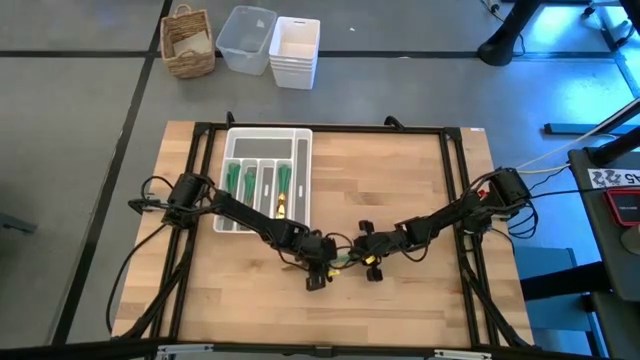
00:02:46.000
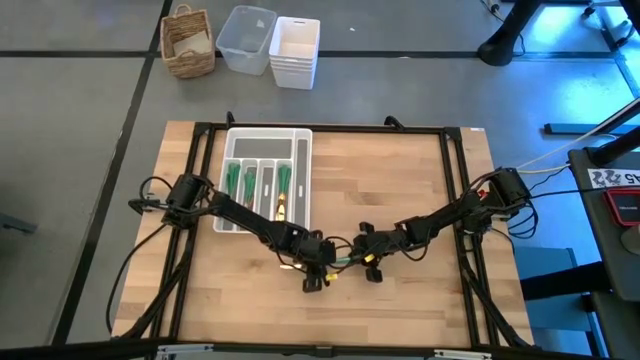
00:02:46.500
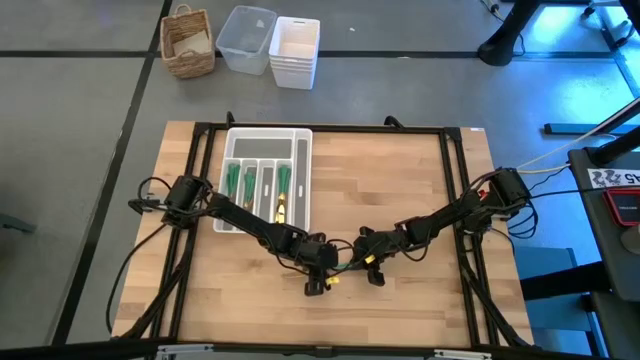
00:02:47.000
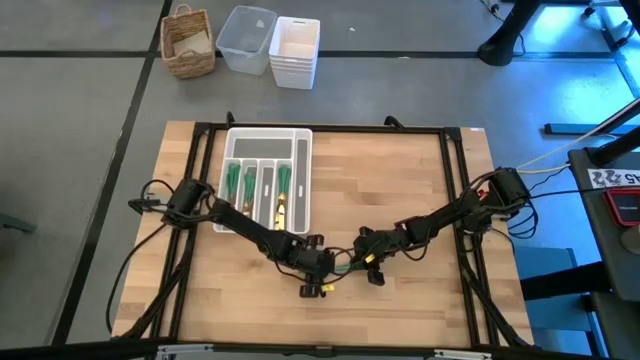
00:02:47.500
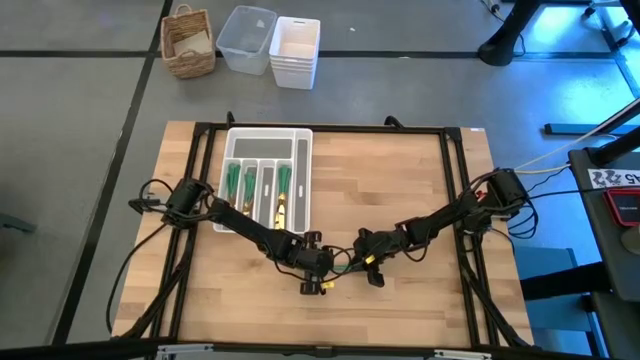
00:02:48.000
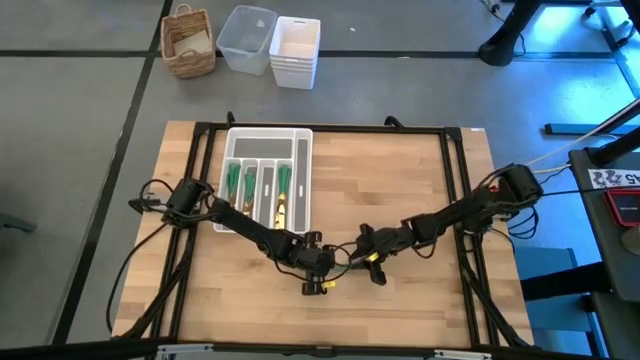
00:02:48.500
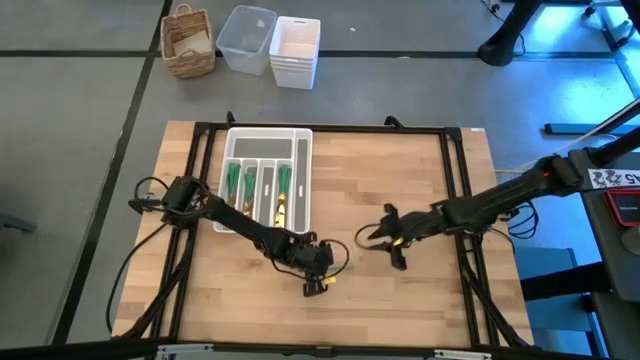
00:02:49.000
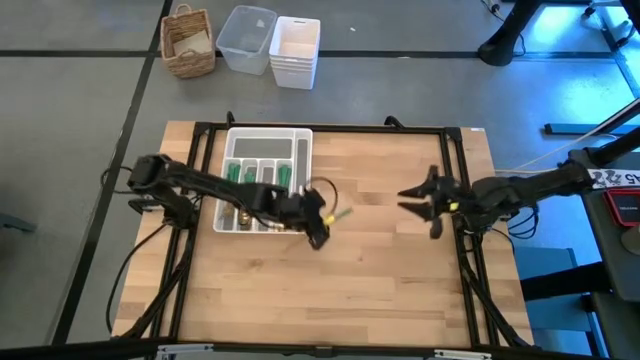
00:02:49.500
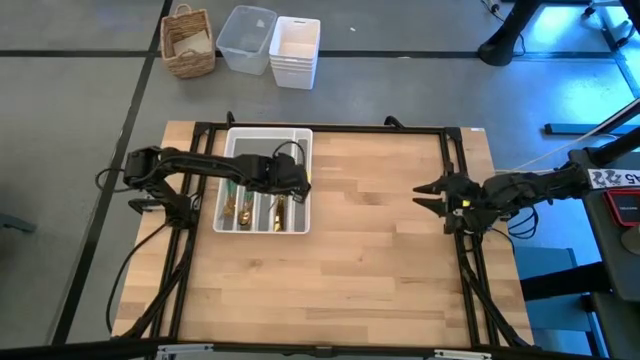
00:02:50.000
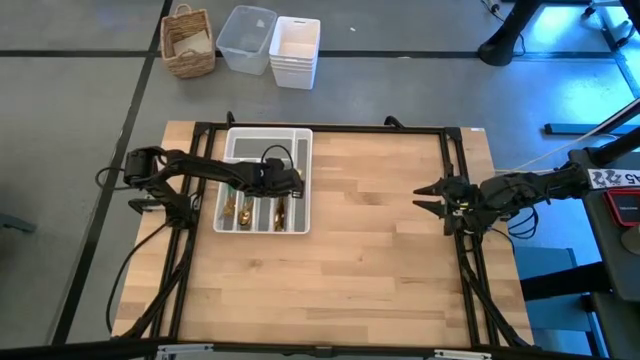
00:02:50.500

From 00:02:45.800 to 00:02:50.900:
Task: Sort silverware
Put the green knife into the white silverware tray

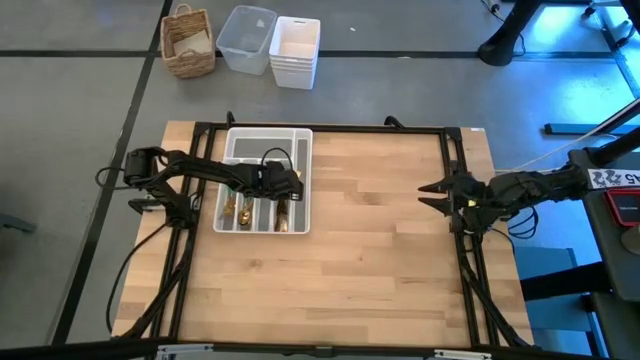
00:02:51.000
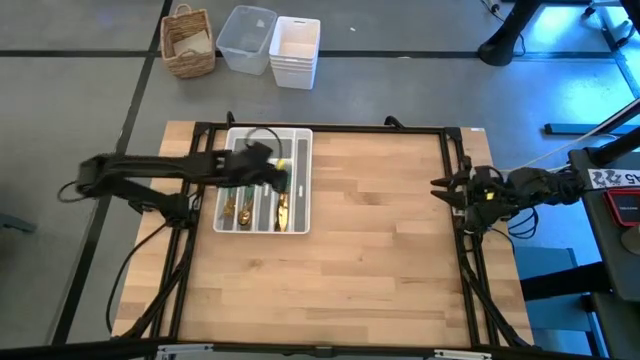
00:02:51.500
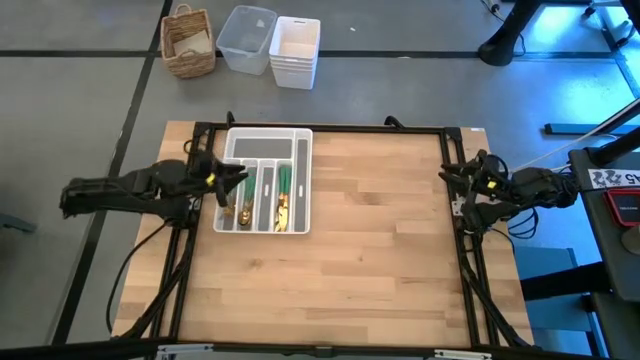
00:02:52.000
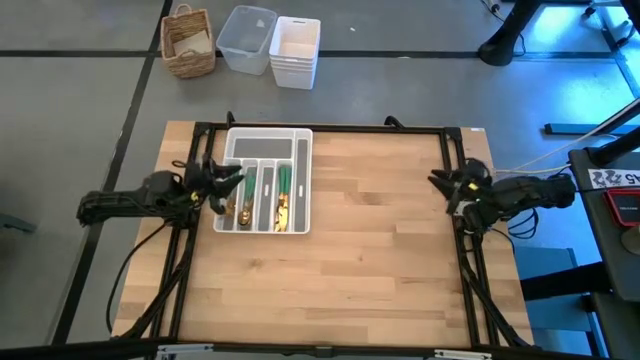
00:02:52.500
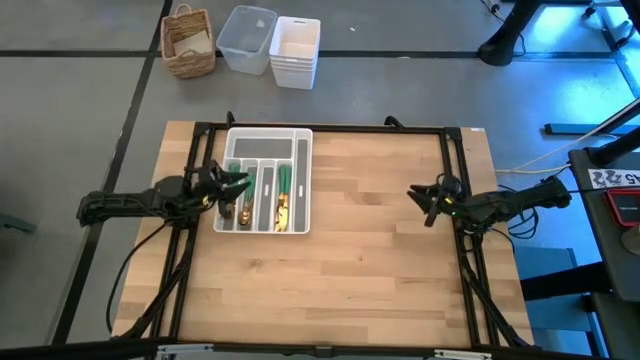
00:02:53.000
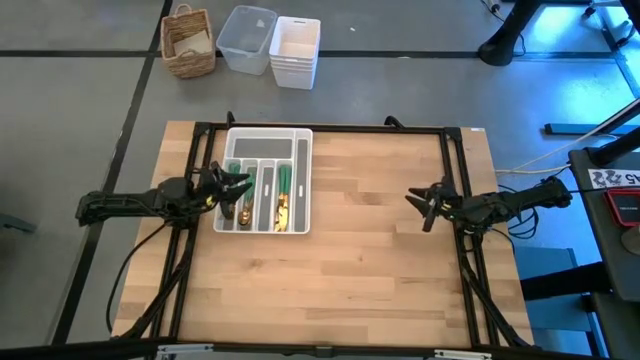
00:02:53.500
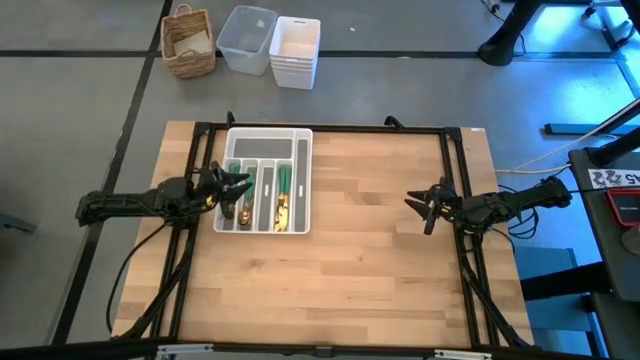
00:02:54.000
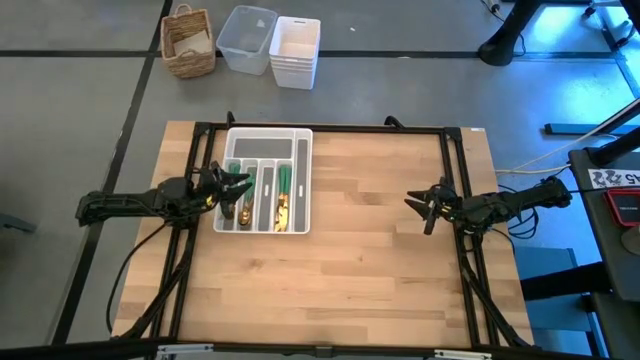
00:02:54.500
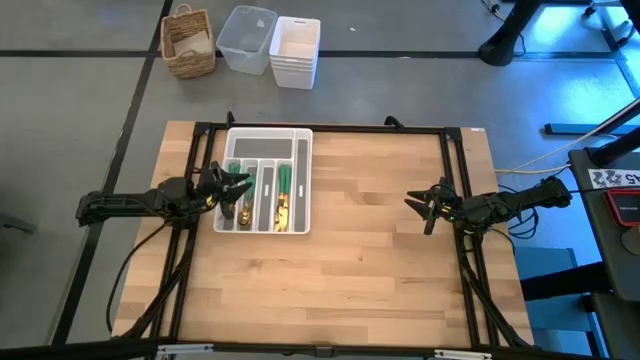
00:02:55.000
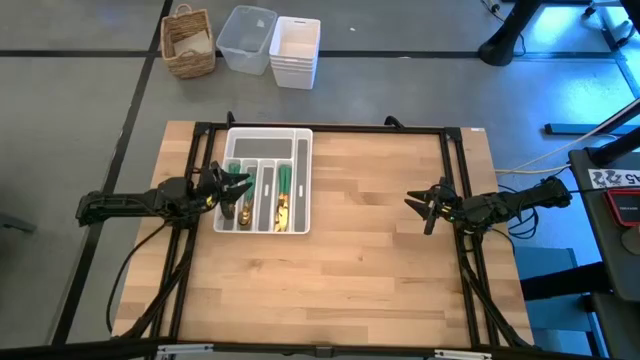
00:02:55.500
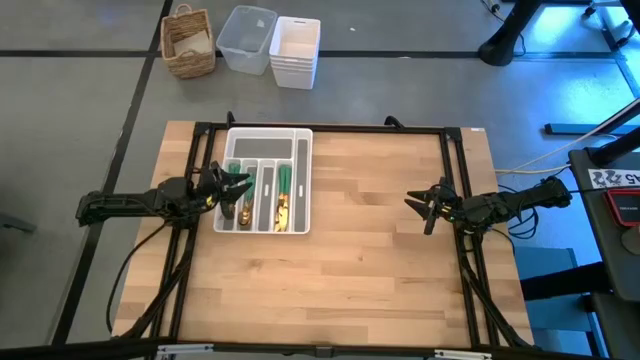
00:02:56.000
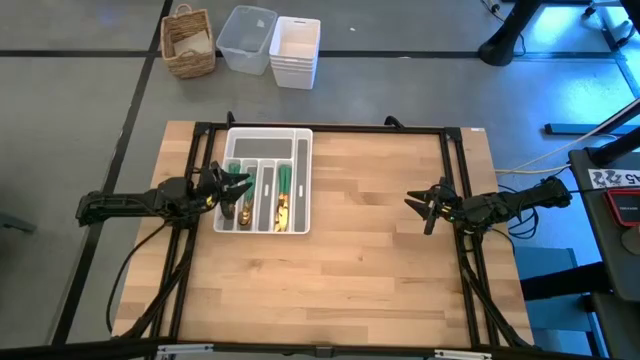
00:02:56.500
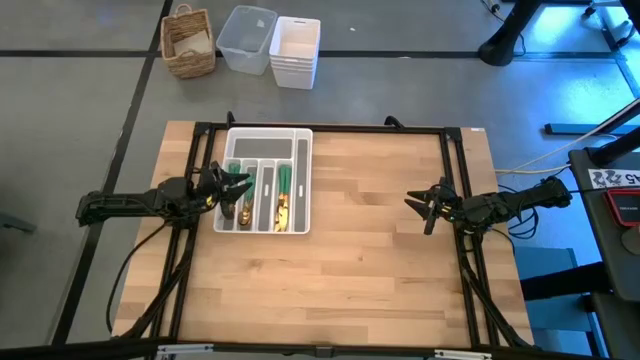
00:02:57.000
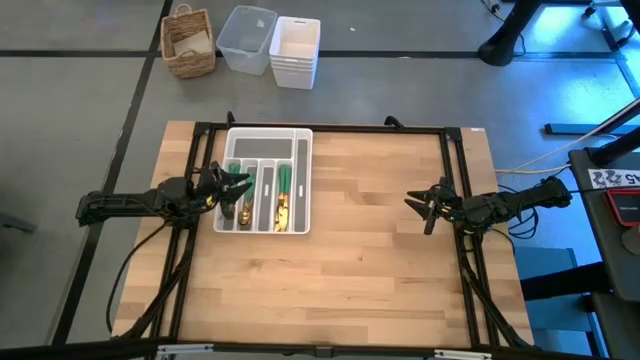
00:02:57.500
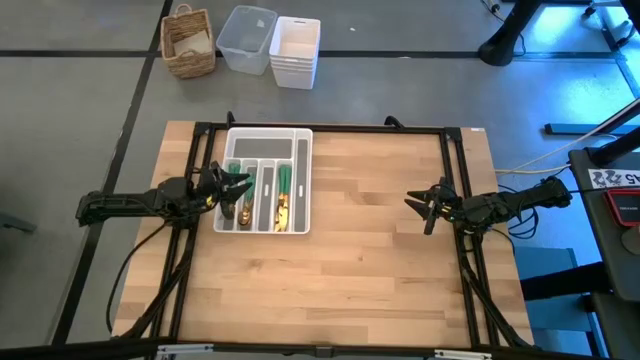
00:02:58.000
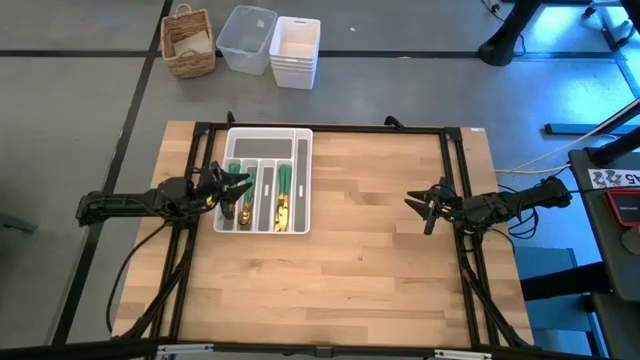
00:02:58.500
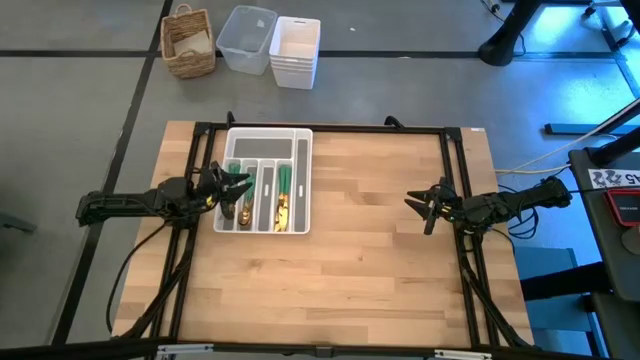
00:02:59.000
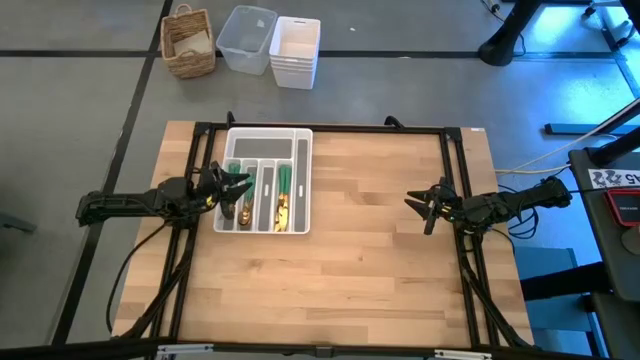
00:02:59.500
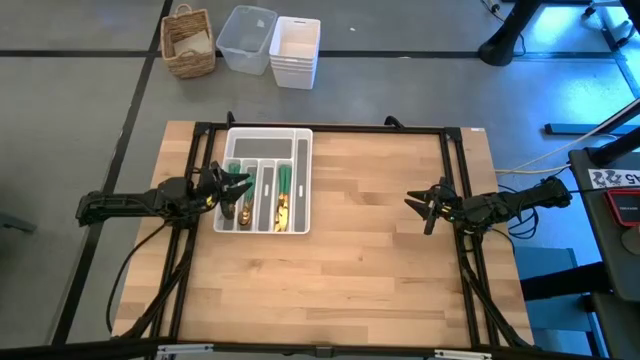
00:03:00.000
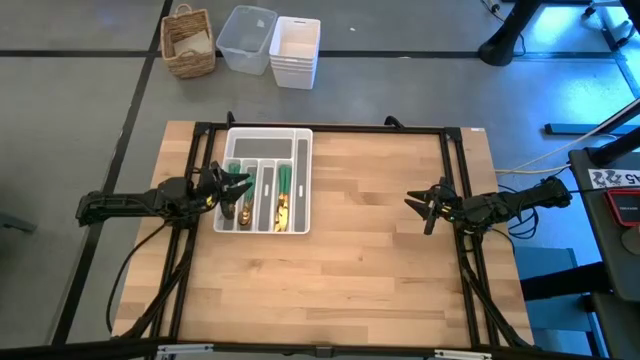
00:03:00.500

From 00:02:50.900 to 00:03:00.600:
Return to Home Position

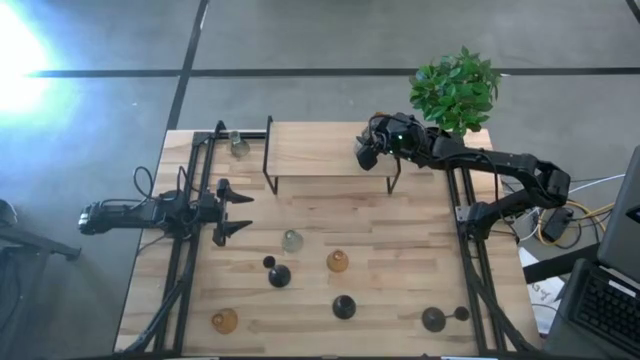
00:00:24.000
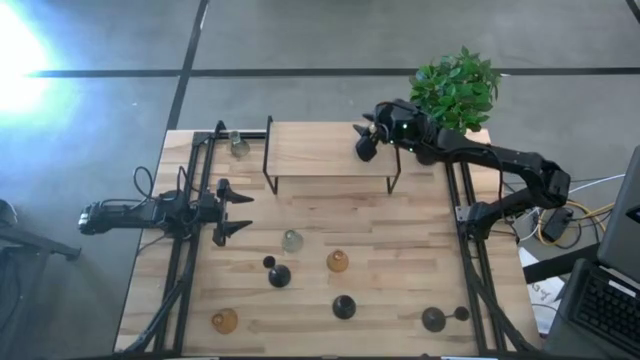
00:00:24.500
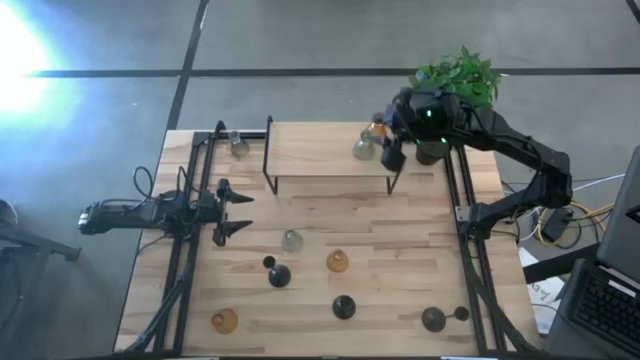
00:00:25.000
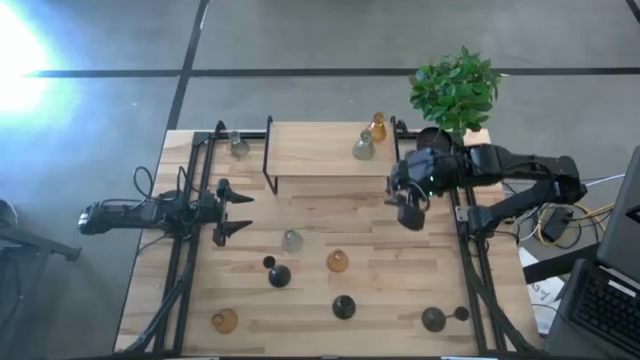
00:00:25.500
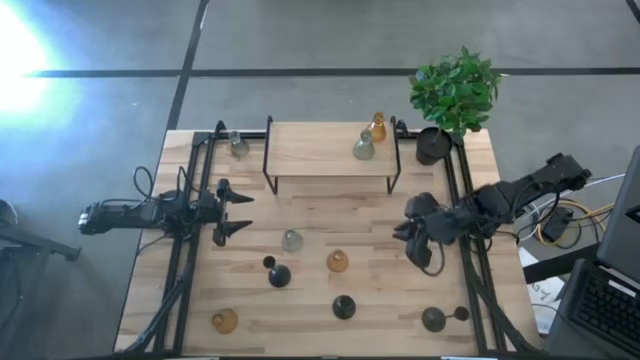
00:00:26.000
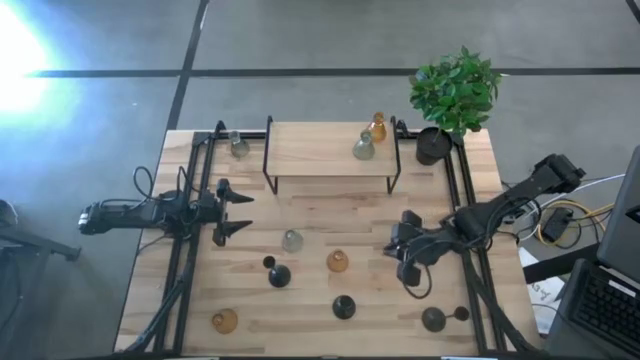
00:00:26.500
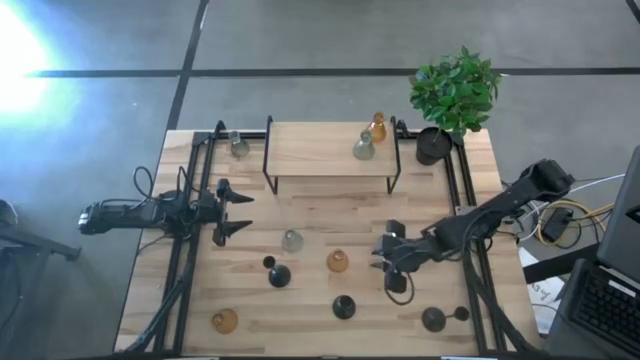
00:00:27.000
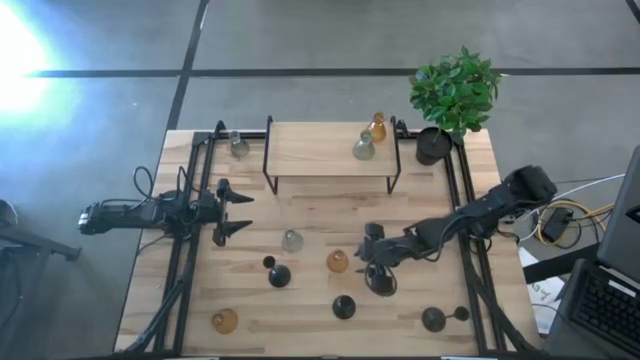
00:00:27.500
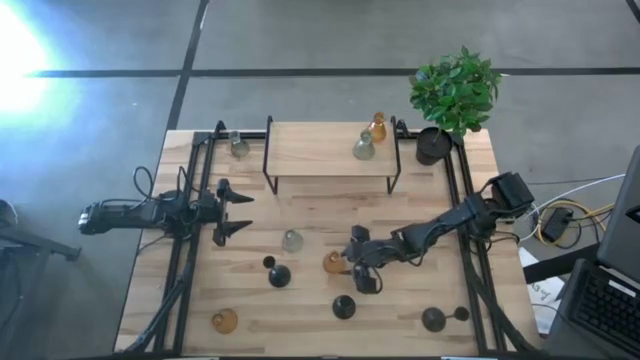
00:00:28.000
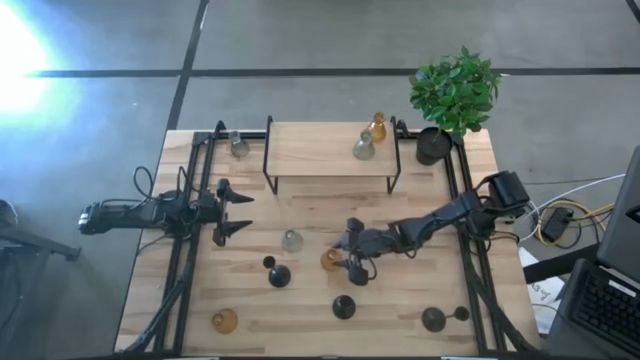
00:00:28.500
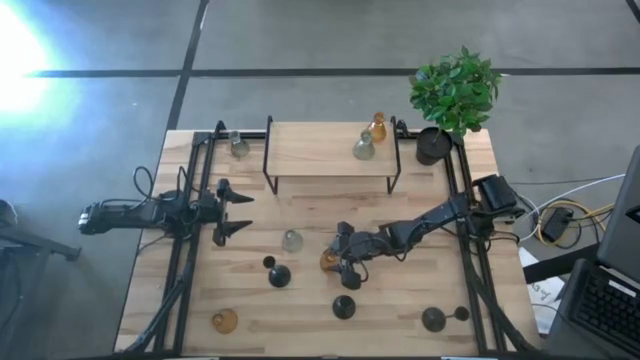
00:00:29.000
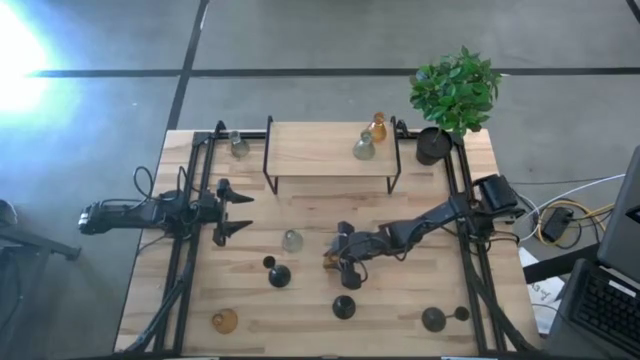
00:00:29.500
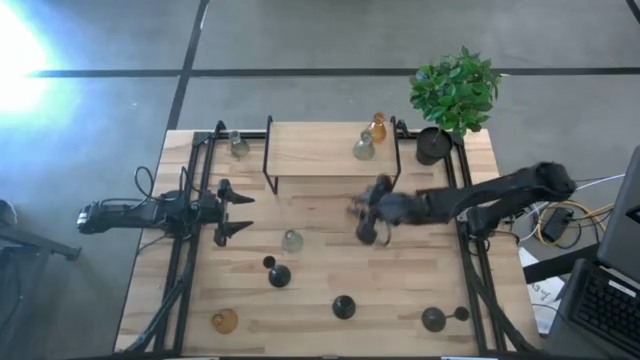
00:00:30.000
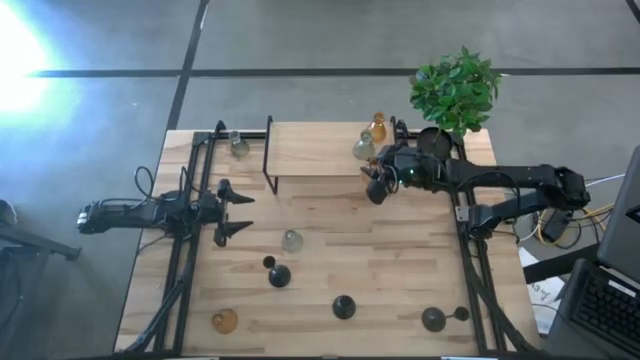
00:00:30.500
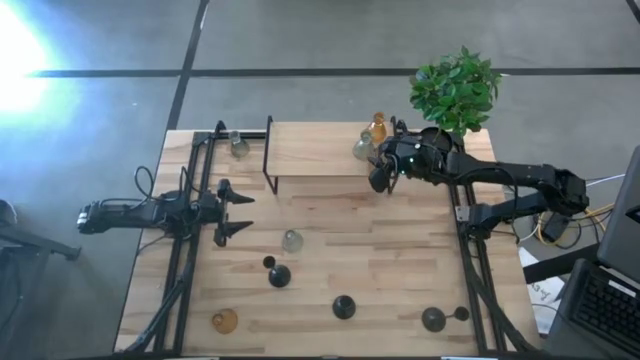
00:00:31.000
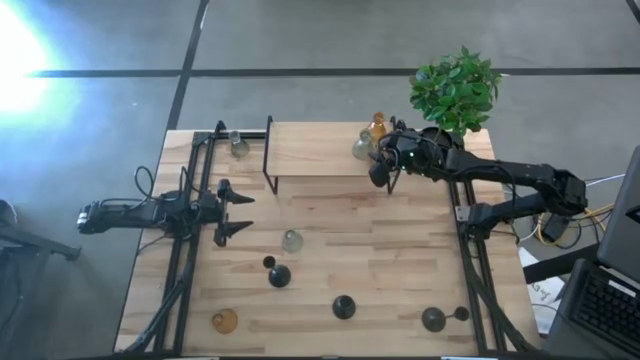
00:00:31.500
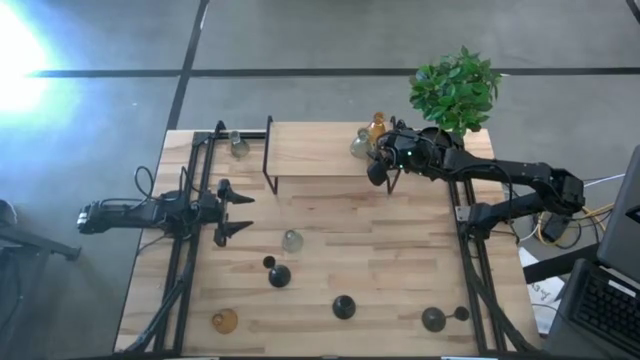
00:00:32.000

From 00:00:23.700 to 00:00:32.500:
Task: Pick & Place candle stick holders
Put the top orange candle holder on the shelf
